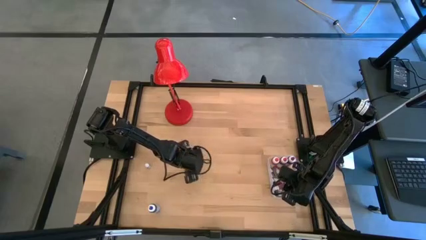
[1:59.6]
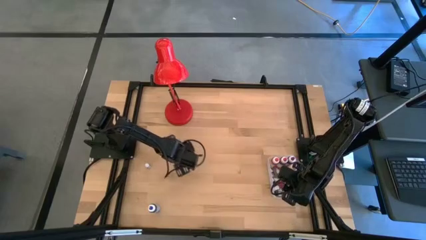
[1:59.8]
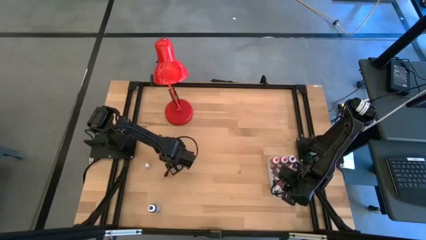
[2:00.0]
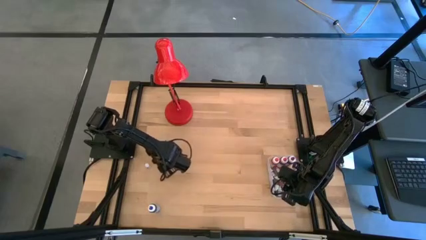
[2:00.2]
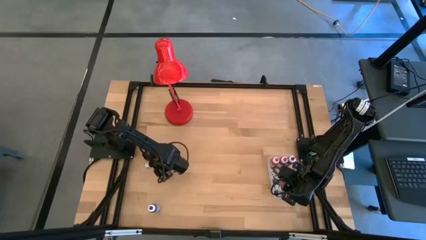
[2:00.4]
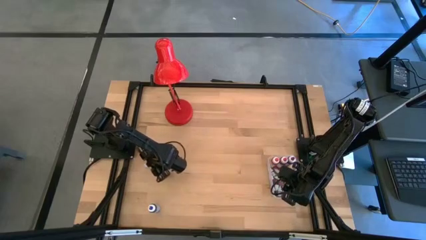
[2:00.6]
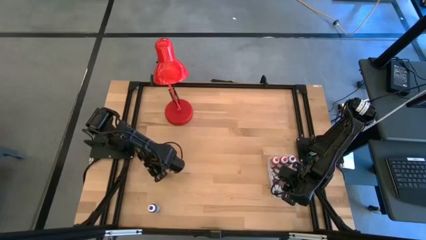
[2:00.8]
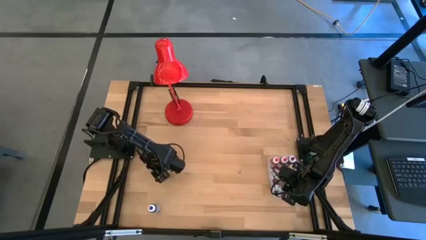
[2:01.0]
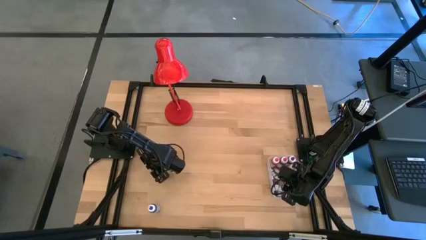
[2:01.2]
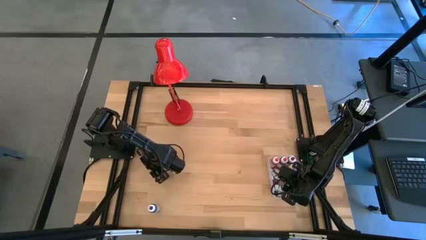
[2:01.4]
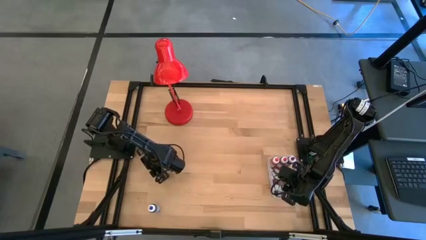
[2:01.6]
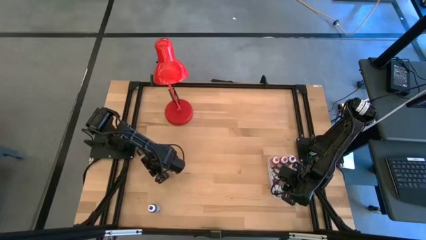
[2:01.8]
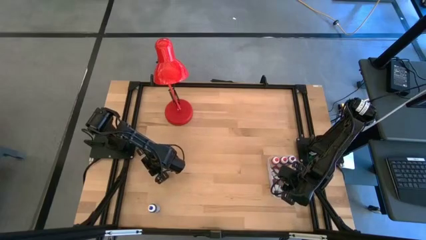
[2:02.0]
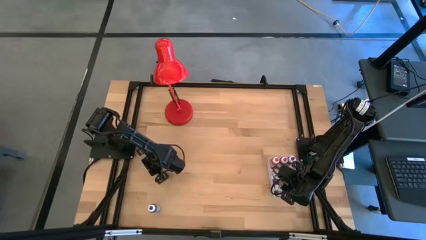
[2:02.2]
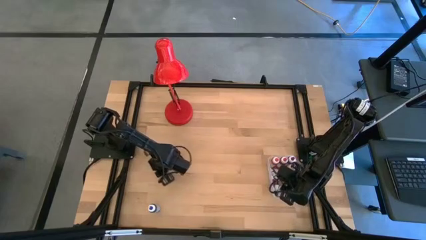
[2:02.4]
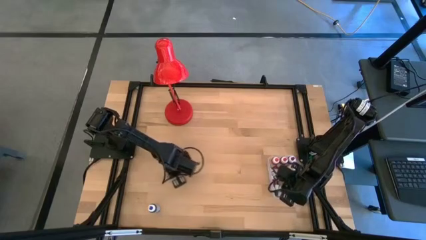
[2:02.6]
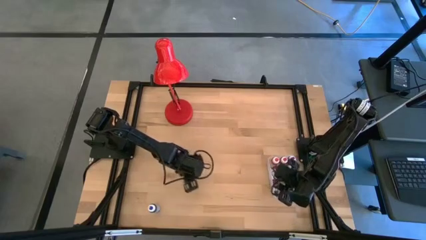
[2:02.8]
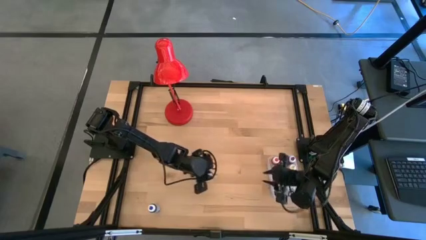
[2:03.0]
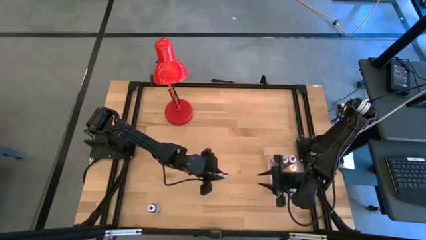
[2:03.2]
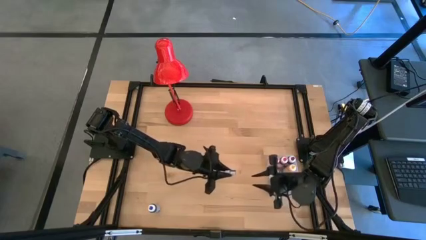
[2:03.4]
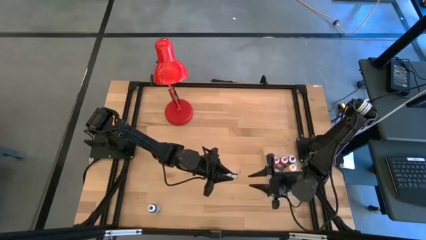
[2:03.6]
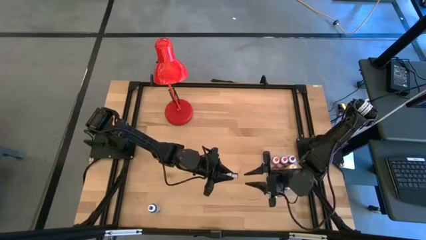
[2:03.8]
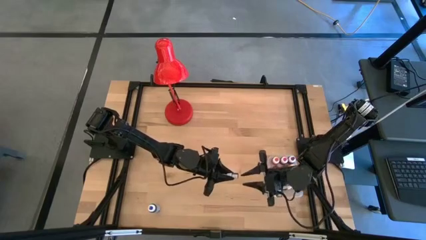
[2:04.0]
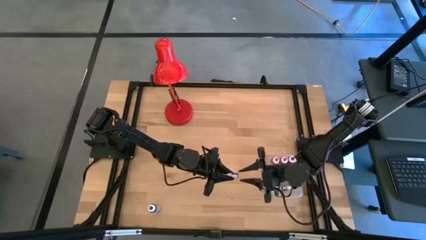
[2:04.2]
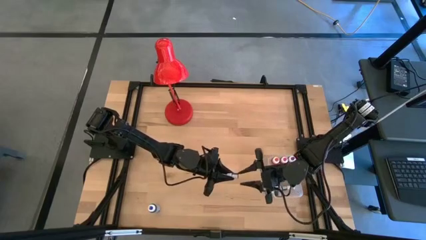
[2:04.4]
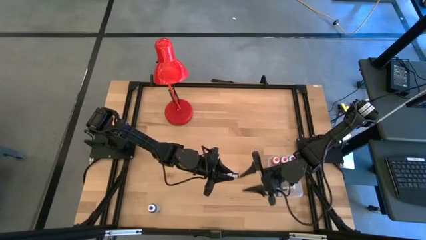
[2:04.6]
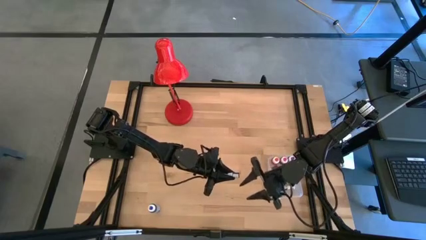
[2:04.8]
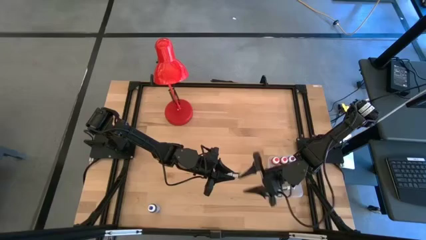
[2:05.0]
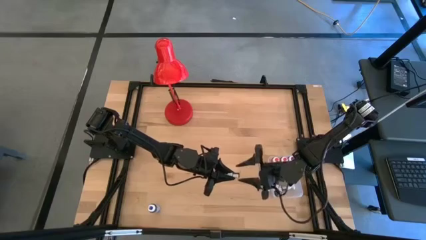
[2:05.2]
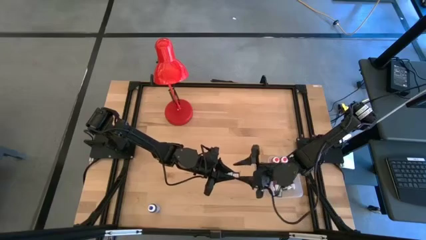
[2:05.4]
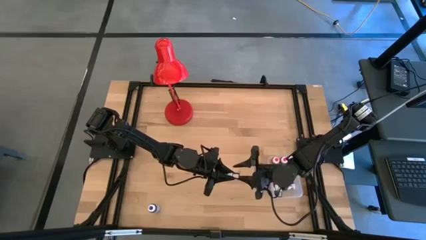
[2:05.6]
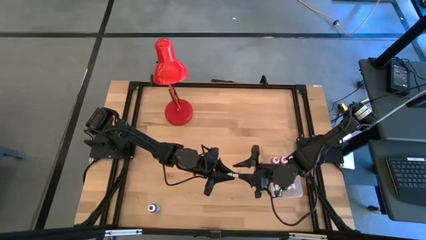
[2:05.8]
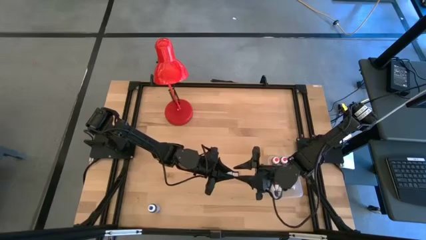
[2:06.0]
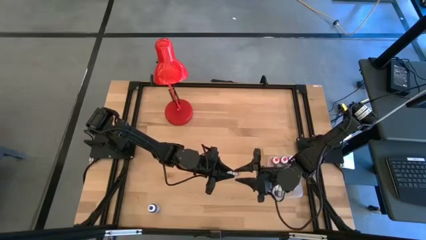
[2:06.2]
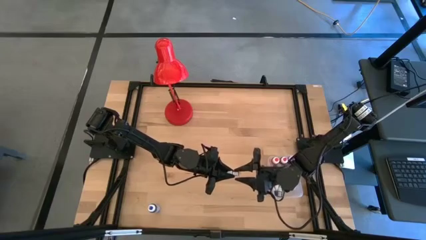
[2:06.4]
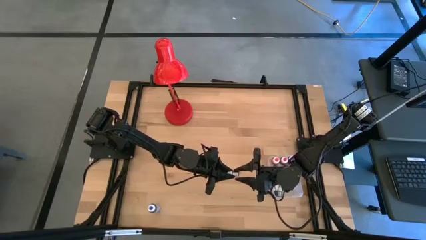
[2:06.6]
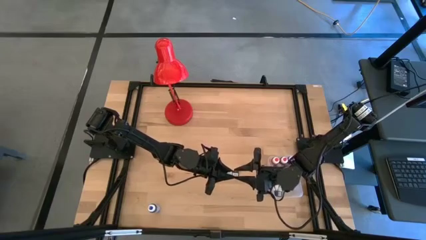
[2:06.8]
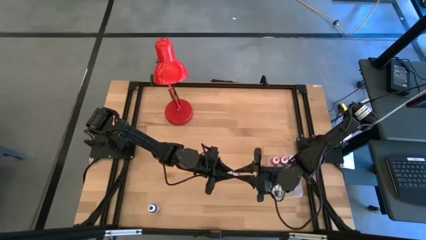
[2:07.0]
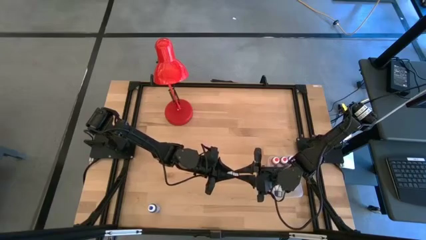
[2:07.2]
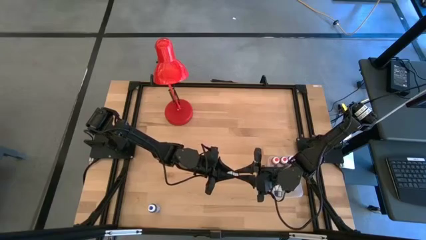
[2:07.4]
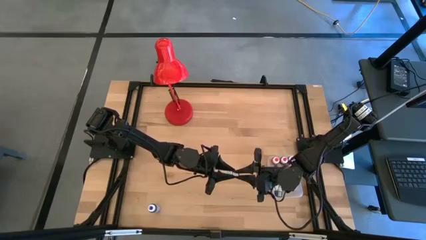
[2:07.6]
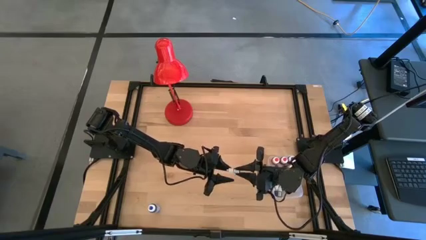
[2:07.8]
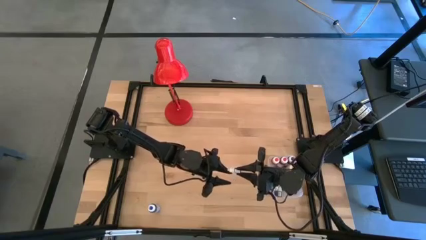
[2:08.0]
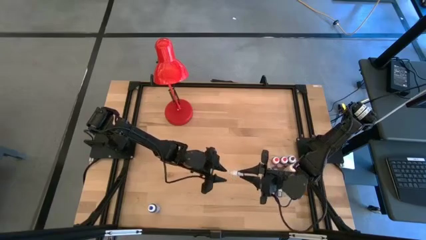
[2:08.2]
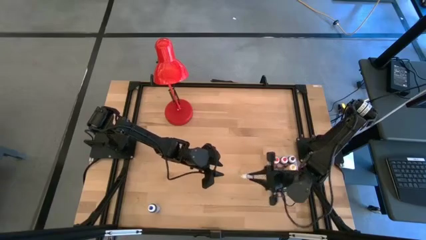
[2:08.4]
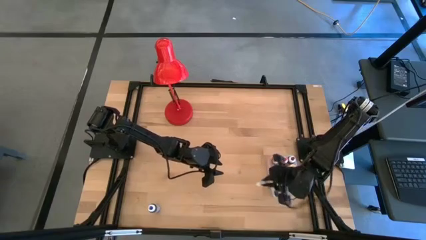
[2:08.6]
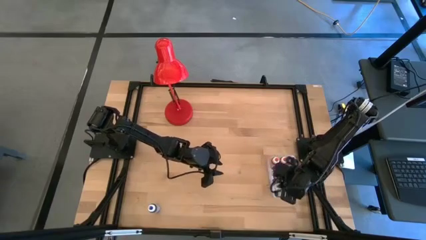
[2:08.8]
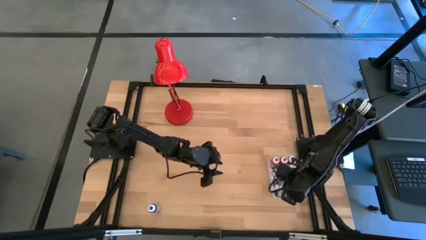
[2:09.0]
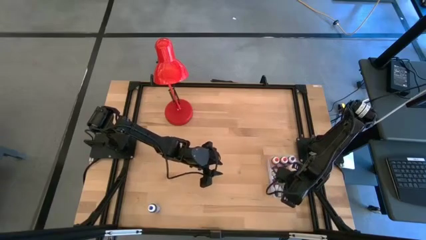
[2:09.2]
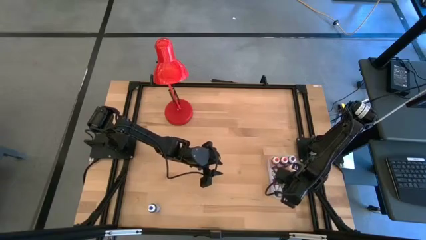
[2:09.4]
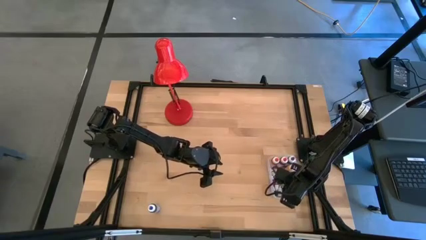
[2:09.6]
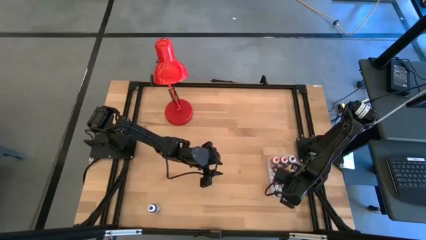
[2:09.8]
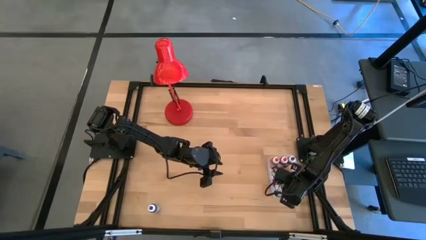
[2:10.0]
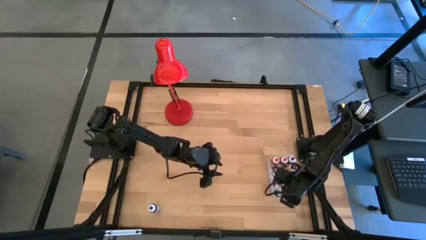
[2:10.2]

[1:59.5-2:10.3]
Task: Pick & Place food coloring
Put the small black bottle into the transparent container

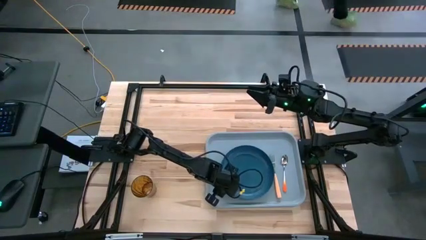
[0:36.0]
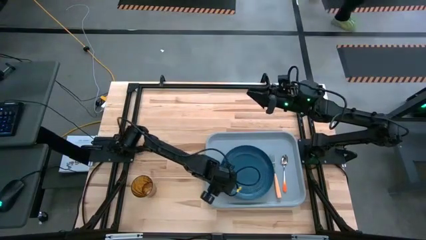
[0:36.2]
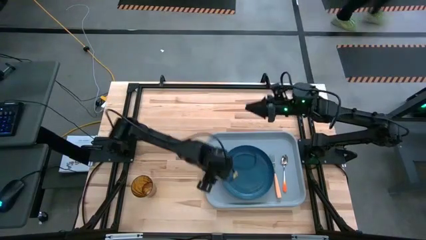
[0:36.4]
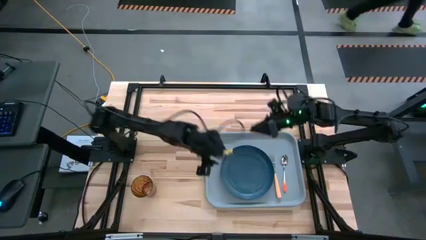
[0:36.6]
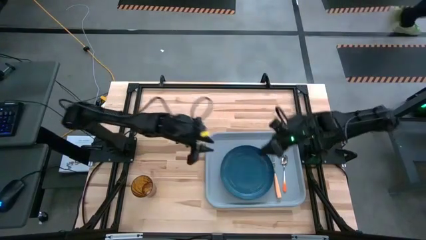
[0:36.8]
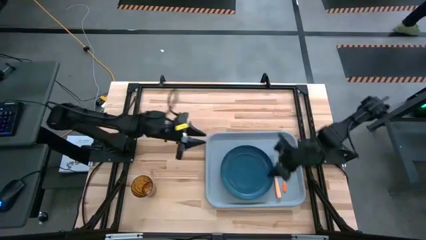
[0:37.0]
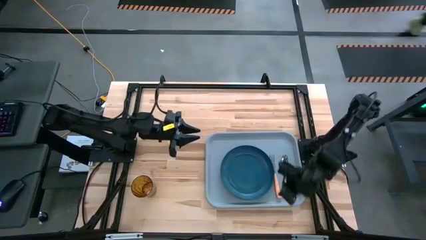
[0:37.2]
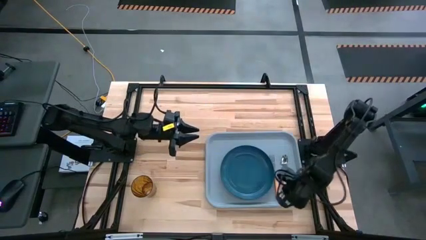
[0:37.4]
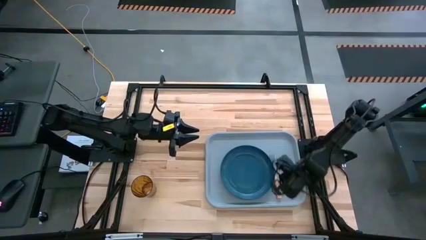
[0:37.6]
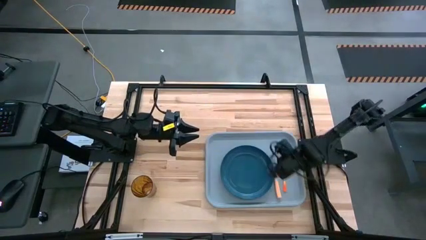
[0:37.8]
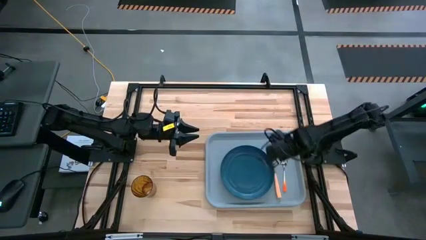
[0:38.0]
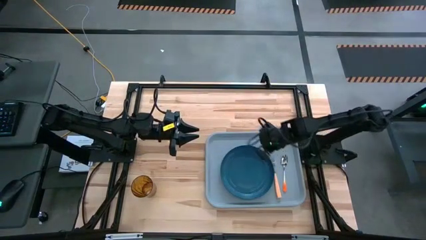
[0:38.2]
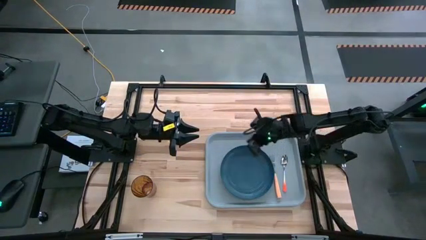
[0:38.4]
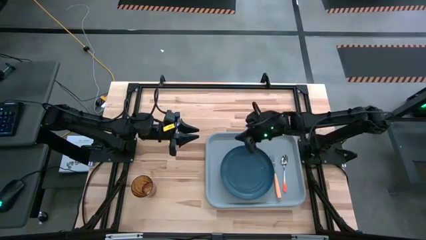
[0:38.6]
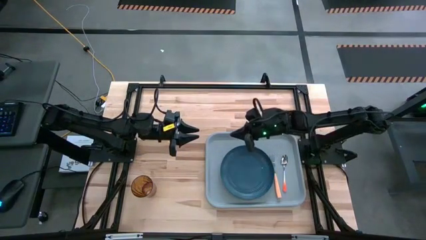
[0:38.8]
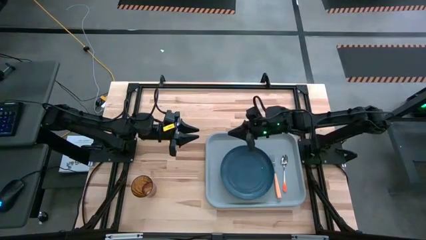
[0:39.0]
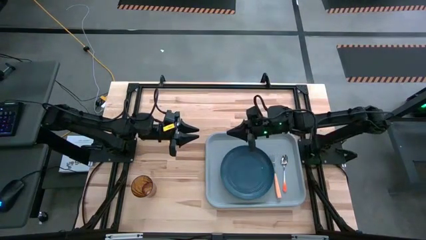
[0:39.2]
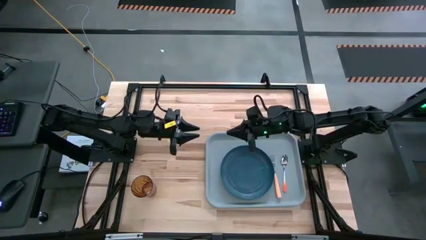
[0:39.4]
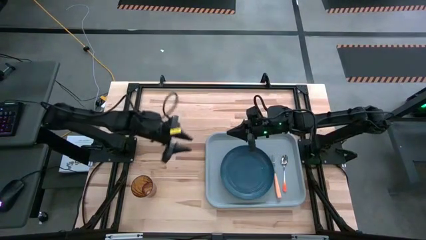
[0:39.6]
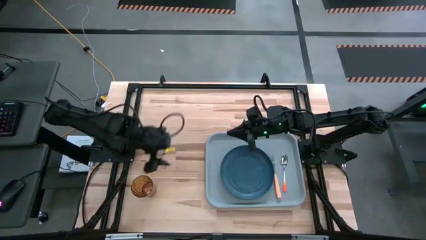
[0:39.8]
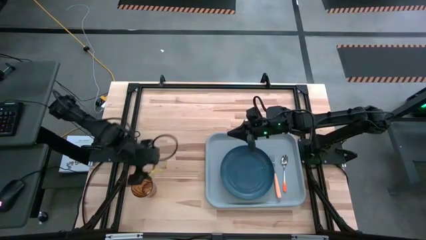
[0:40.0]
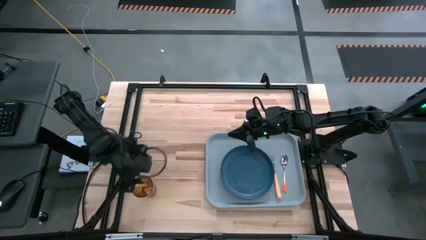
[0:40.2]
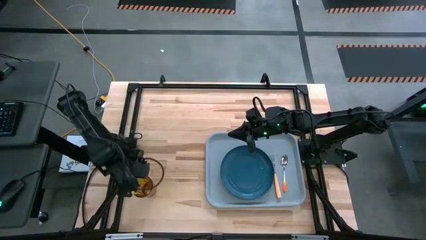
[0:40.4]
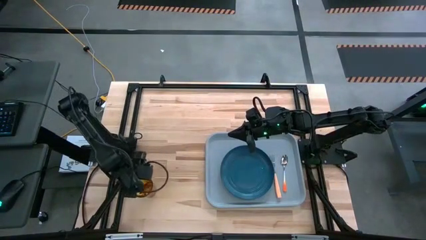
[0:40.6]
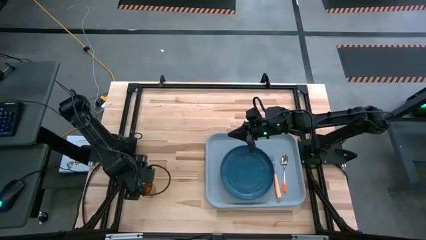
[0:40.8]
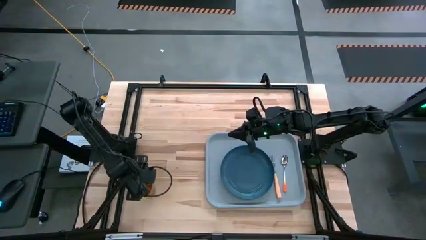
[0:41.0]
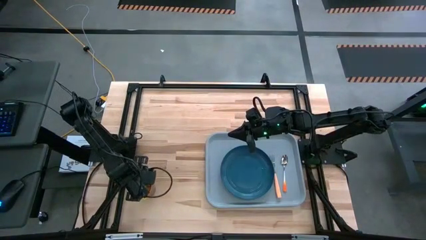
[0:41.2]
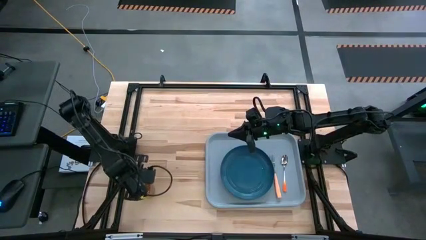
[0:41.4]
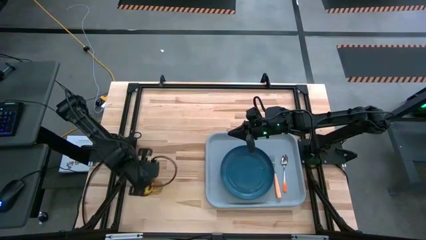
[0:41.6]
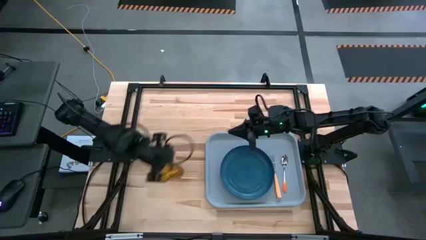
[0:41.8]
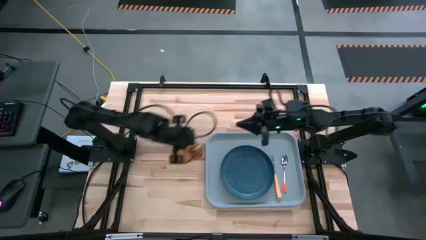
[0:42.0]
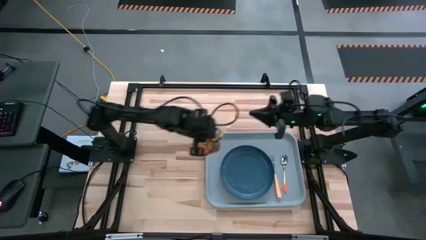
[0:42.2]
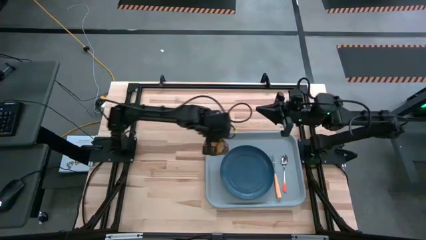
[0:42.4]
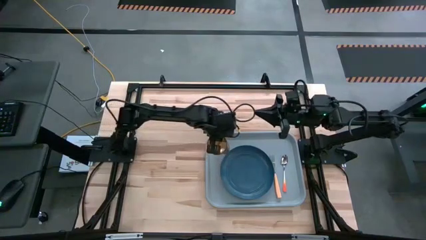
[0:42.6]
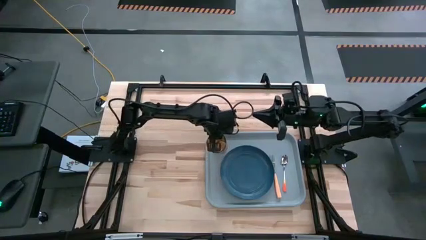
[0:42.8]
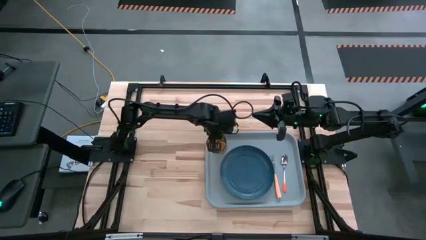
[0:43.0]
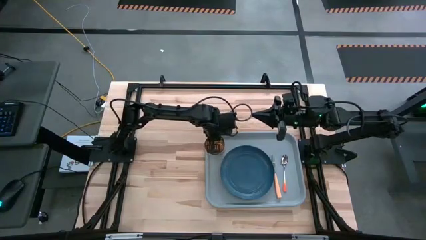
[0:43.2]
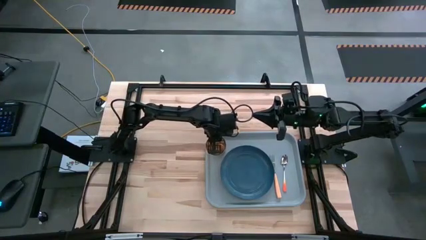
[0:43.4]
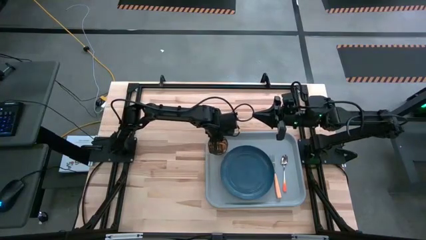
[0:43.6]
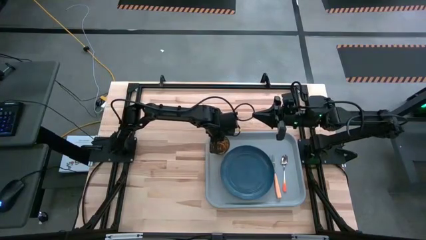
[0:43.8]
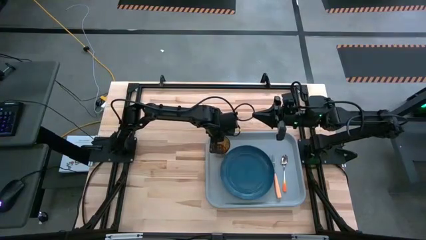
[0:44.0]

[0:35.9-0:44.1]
Task: Pick and place plate/cup/fork/spoon on tray
Put the brown cup on the gray tray to the top left of the blue plate
